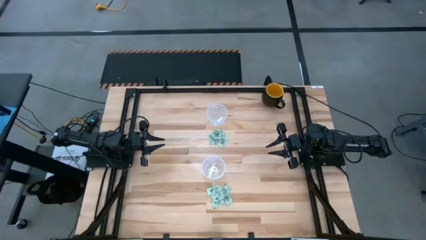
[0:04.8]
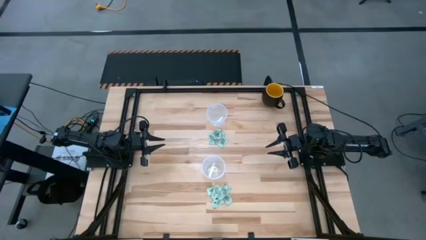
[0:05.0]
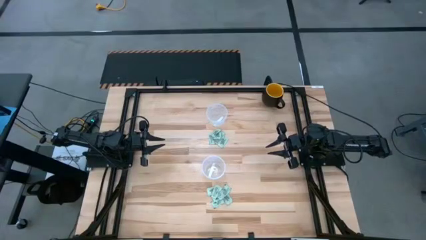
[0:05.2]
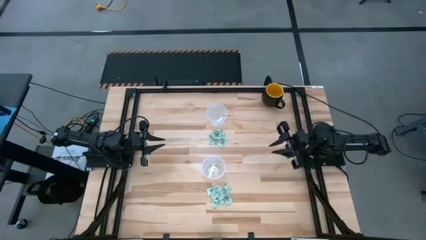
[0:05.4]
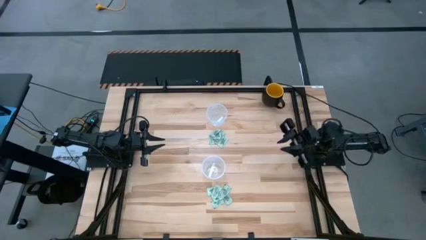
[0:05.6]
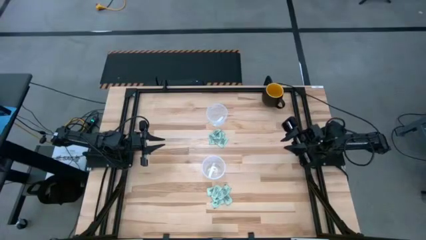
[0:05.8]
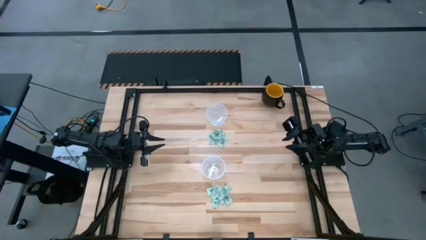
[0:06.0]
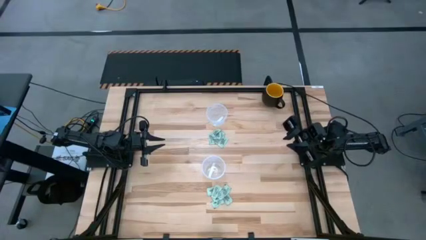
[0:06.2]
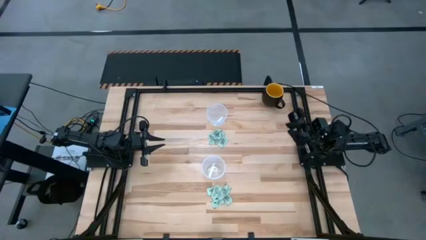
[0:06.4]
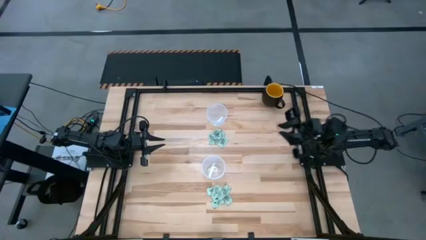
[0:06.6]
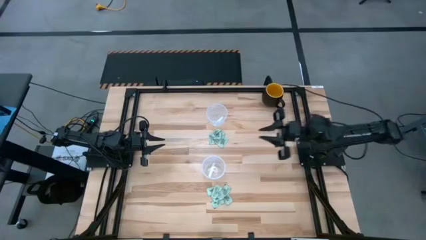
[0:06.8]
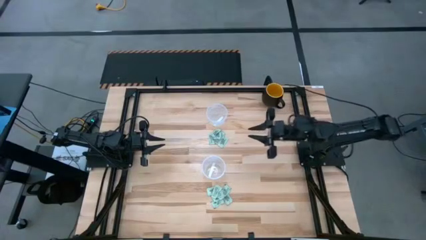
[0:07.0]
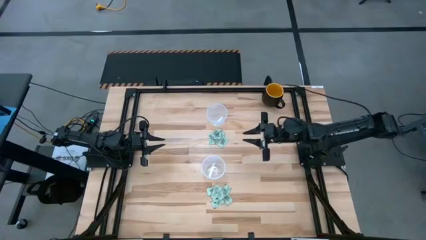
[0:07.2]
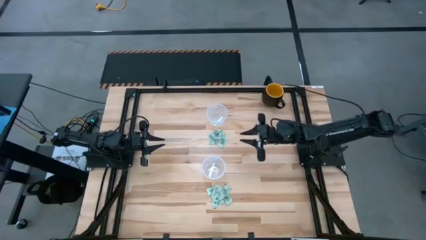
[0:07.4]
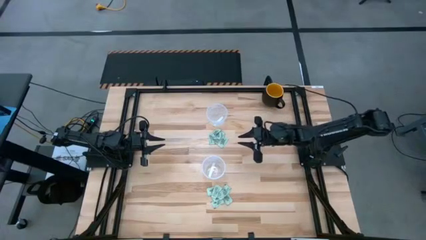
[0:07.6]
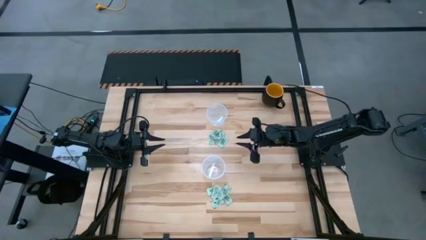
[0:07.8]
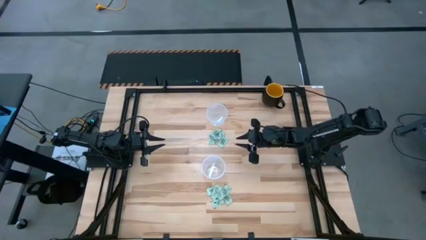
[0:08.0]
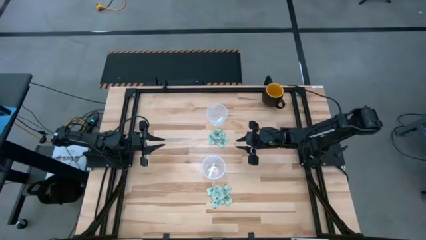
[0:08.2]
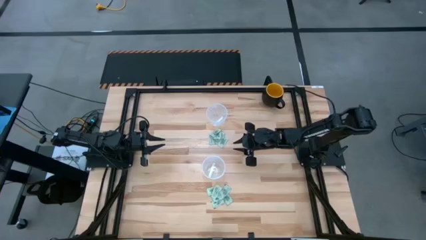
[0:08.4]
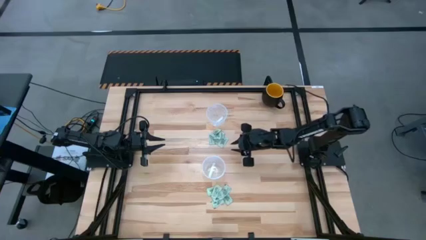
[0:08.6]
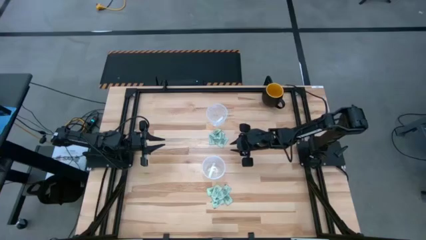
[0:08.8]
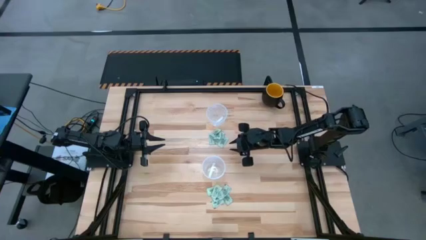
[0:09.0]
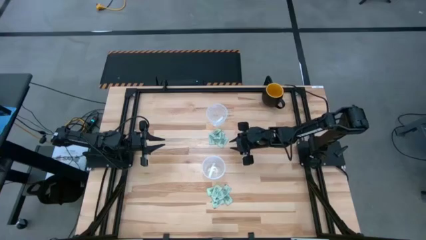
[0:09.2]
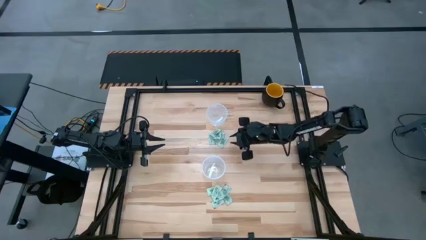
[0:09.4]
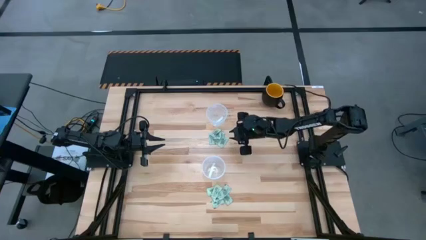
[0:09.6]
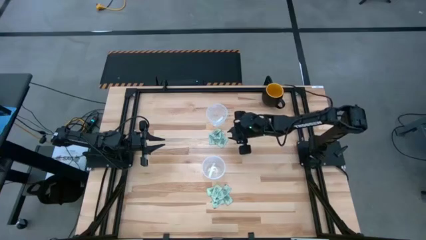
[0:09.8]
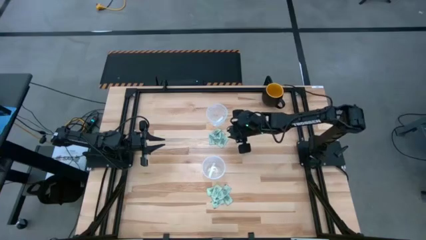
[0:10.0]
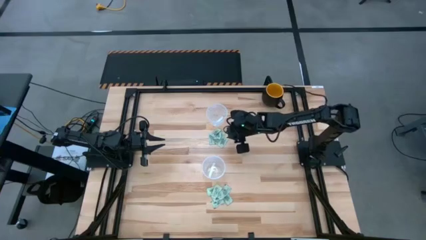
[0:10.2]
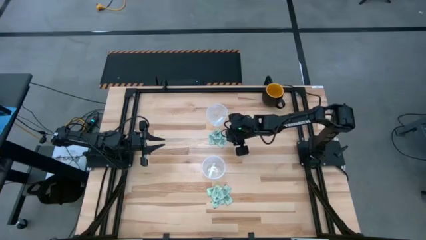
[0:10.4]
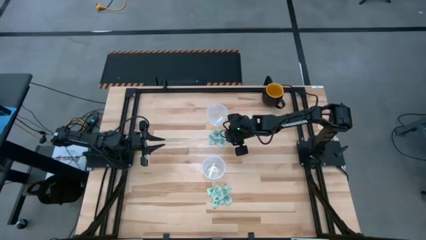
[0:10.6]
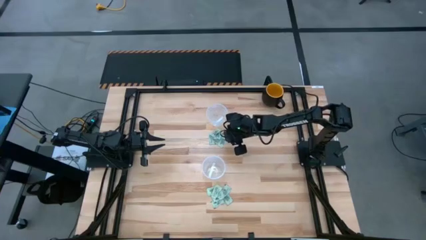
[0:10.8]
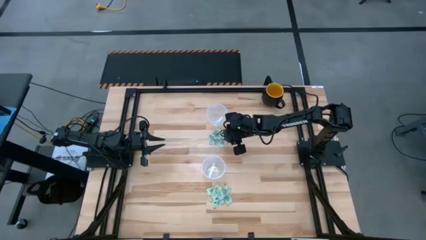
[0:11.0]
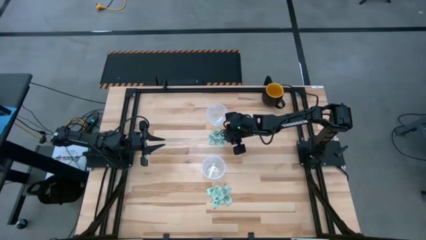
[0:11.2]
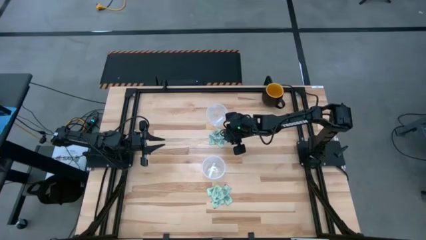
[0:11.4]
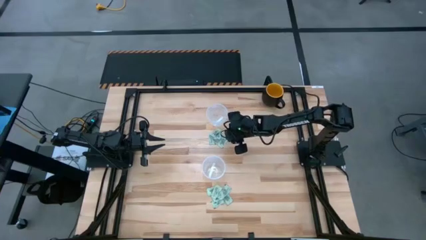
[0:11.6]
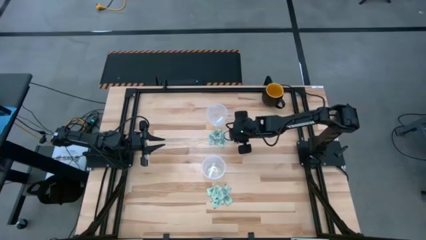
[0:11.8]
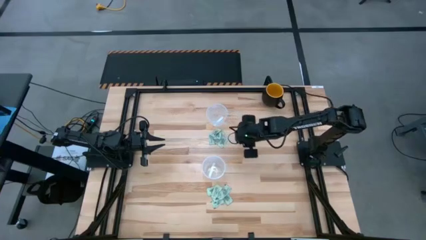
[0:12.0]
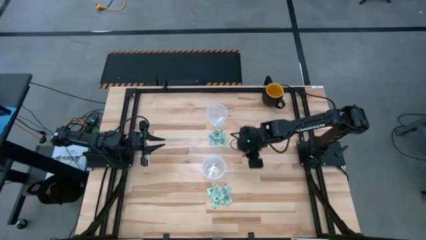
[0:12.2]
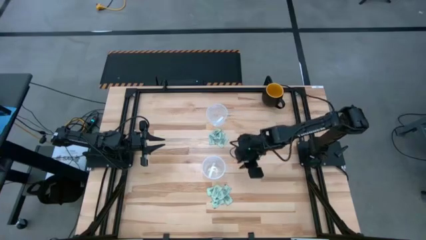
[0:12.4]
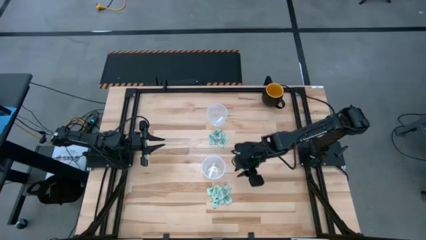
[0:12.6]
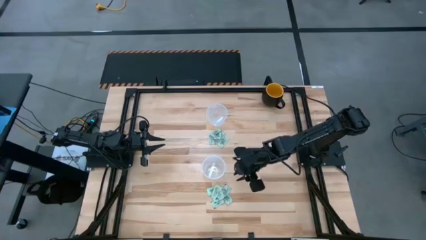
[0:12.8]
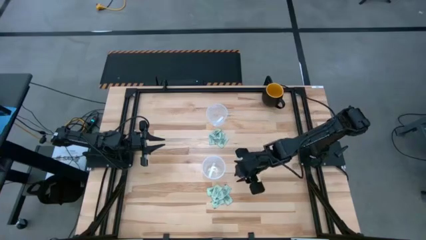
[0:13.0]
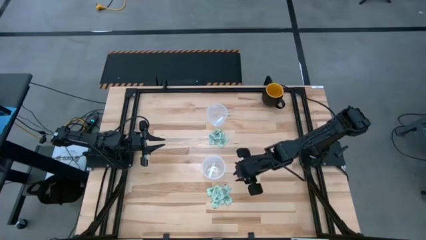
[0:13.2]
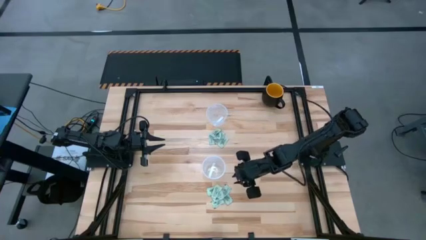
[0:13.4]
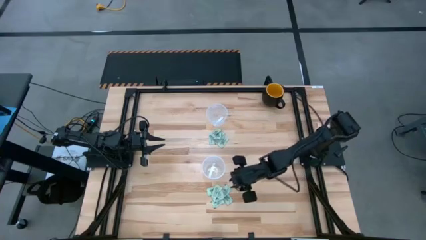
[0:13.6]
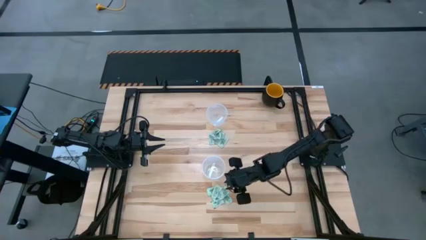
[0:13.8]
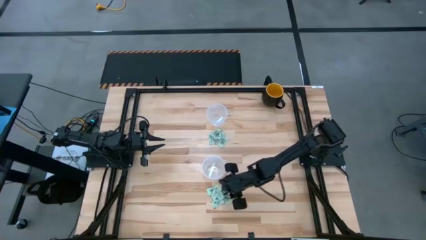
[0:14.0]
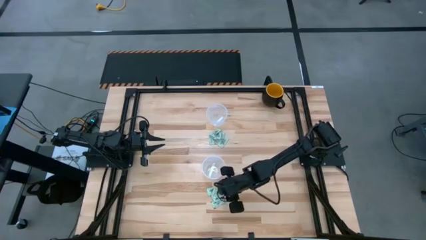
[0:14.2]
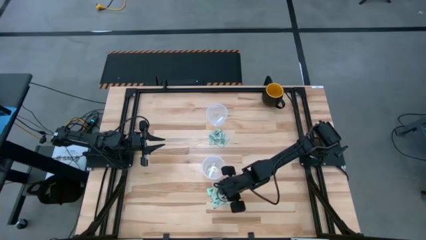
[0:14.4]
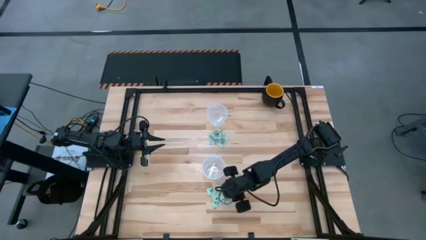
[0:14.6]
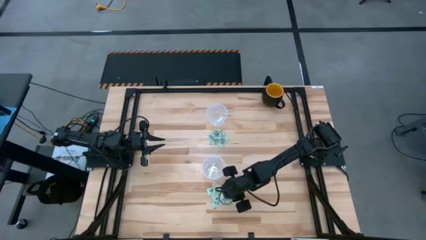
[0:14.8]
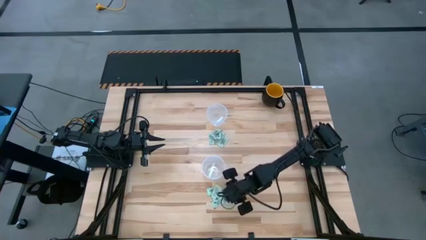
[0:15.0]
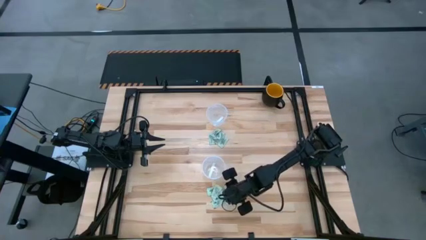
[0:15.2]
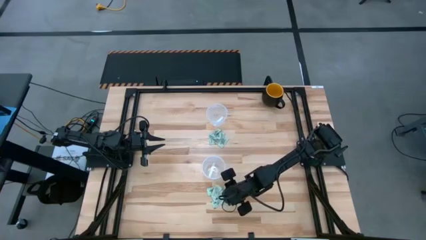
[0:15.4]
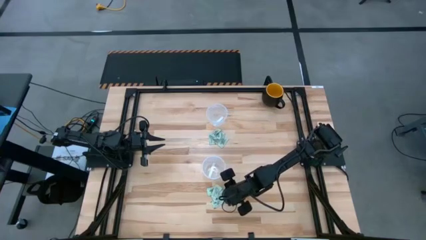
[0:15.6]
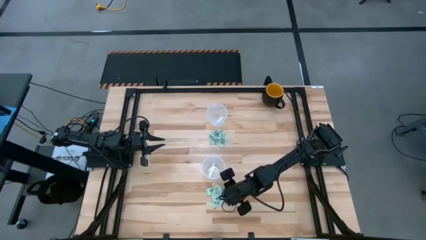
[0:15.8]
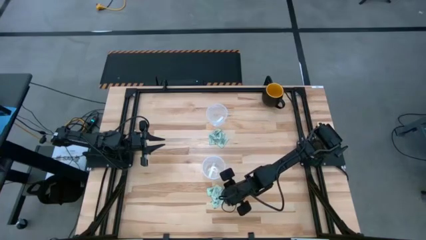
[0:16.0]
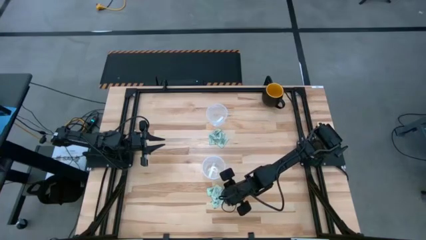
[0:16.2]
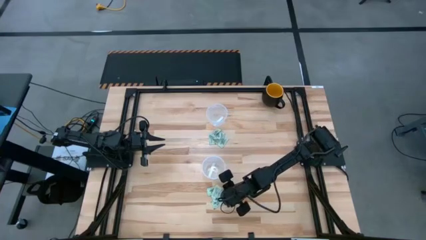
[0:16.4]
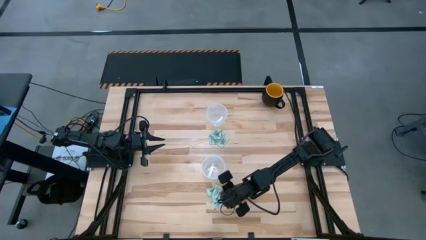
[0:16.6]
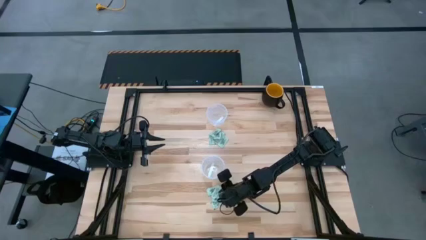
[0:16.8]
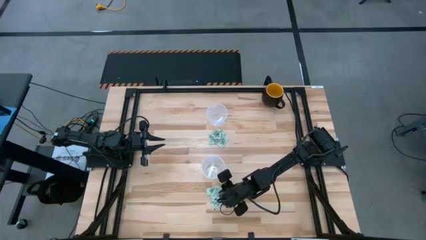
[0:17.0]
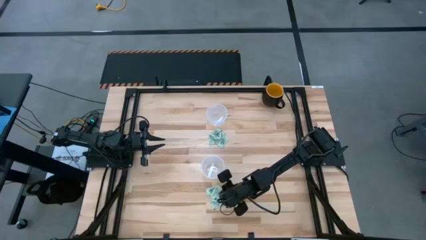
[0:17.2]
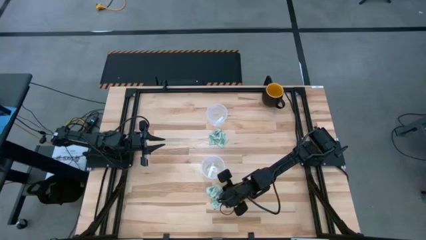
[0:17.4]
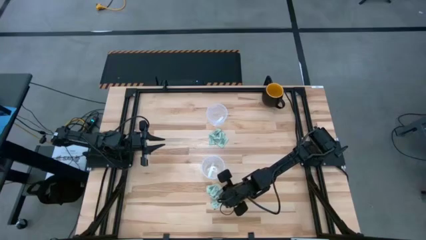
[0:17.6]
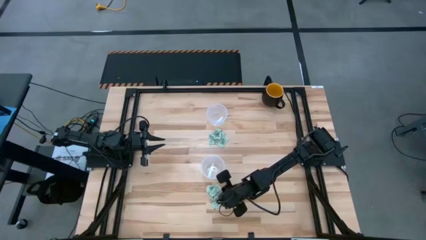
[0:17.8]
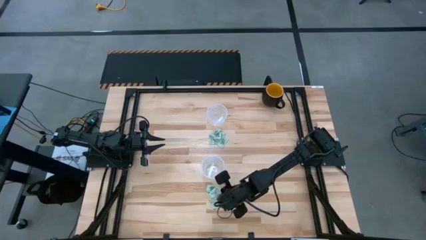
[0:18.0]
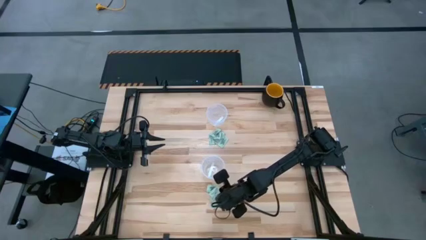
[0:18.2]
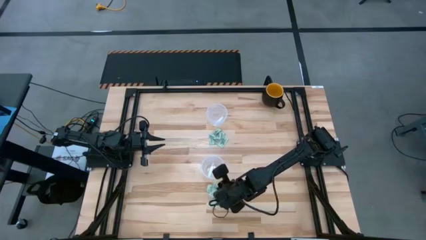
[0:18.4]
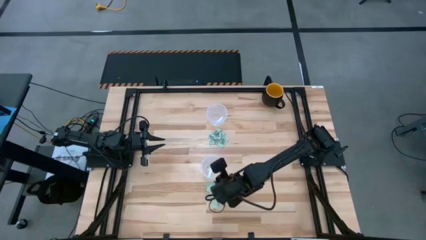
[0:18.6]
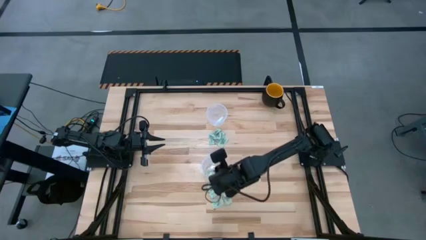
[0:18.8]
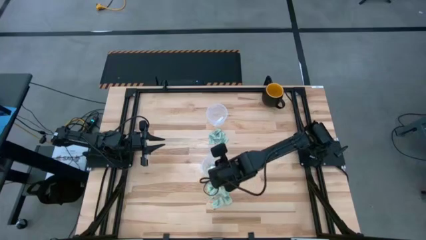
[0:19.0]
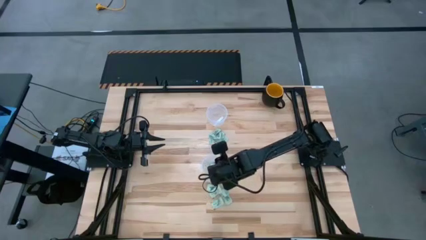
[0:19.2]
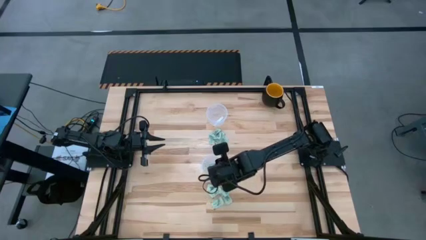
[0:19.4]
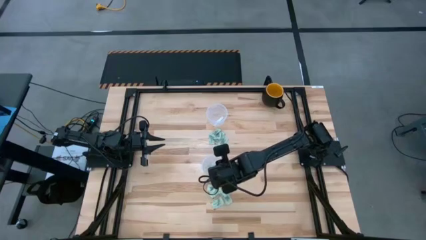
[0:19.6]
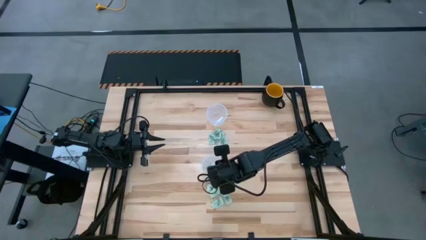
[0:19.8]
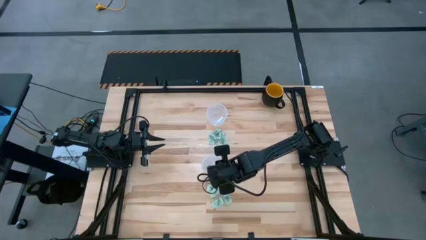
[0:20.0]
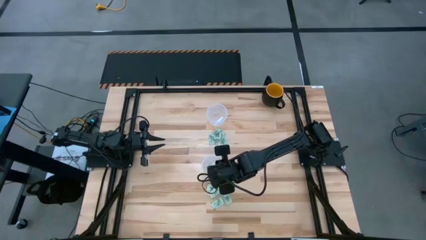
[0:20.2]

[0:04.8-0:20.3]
Task: Pick and place items into bin
Put the bottom right stevia packet into the bottom bin
